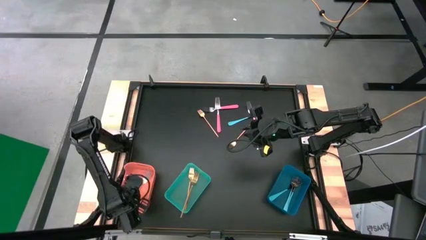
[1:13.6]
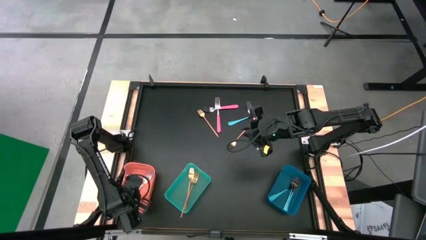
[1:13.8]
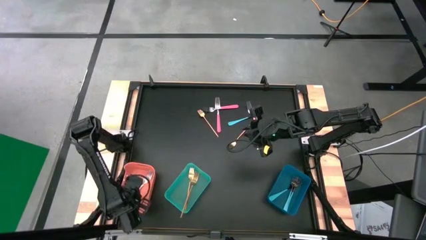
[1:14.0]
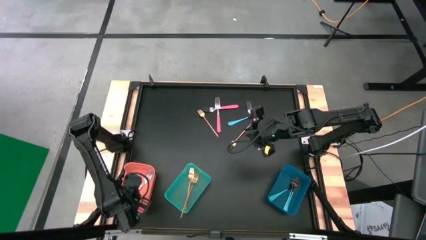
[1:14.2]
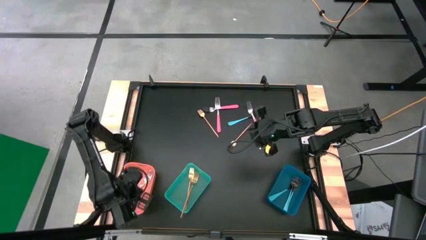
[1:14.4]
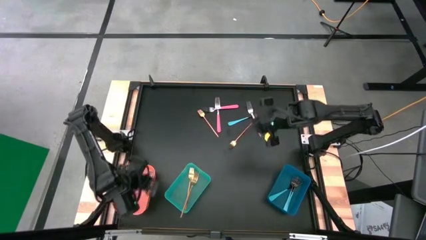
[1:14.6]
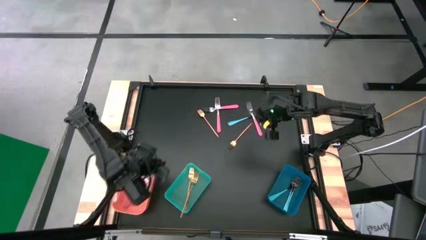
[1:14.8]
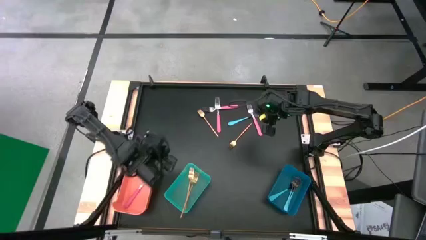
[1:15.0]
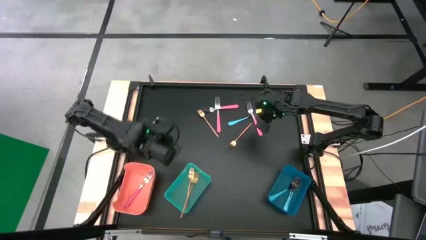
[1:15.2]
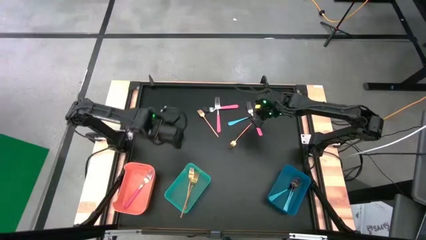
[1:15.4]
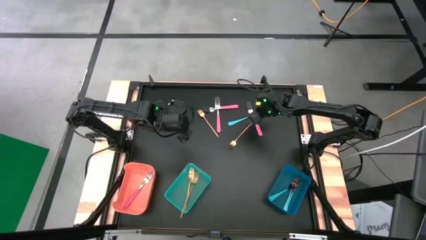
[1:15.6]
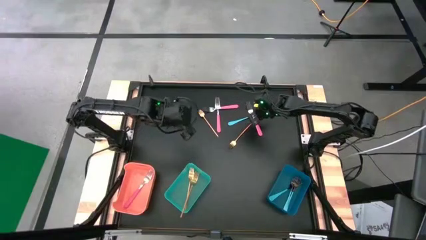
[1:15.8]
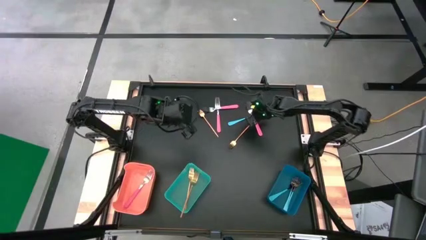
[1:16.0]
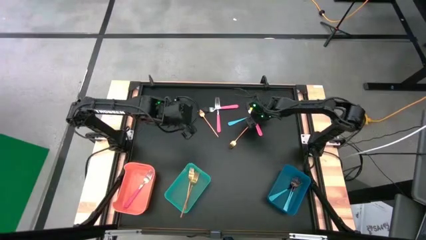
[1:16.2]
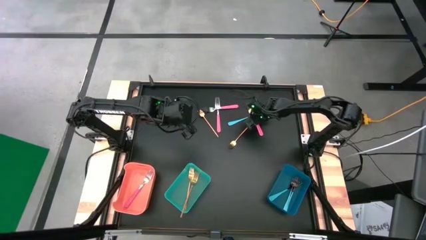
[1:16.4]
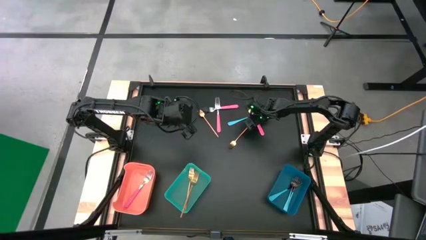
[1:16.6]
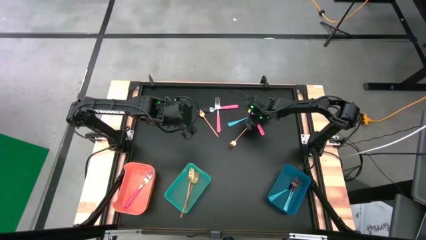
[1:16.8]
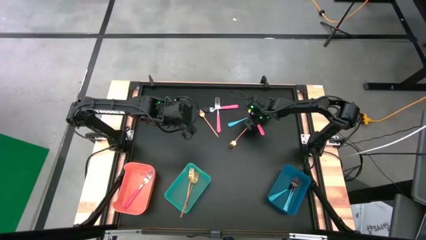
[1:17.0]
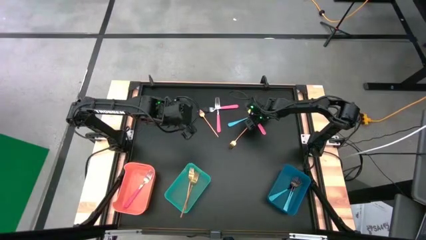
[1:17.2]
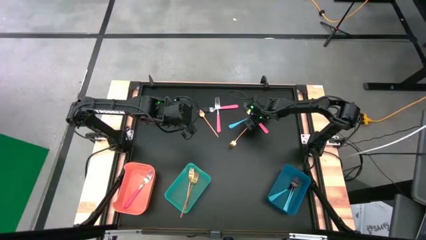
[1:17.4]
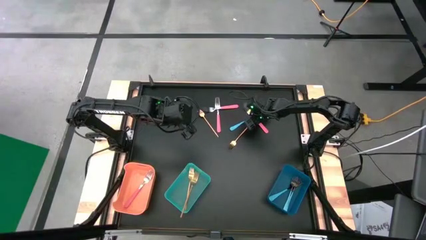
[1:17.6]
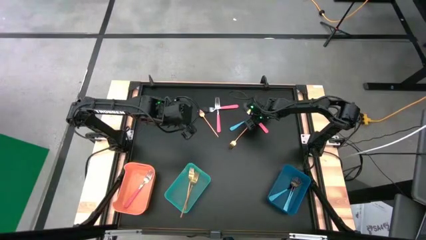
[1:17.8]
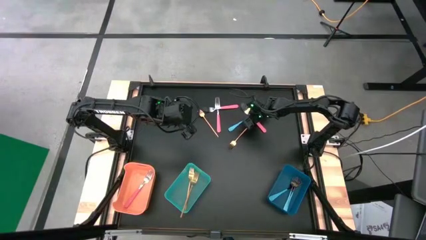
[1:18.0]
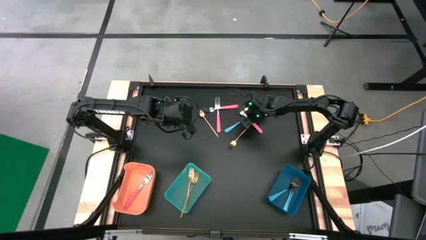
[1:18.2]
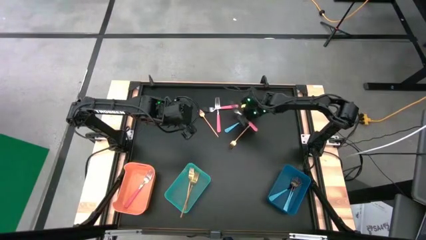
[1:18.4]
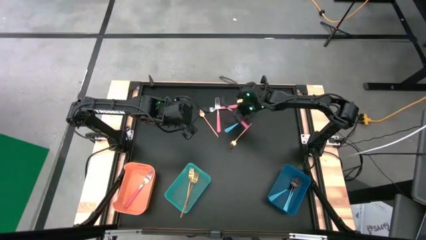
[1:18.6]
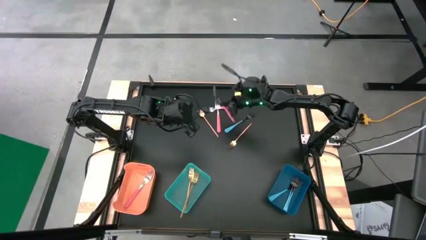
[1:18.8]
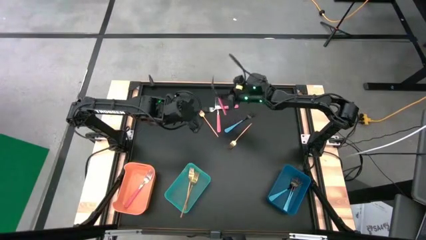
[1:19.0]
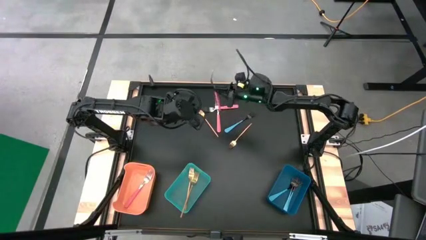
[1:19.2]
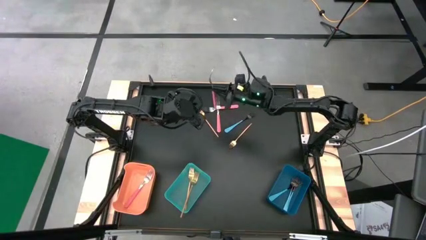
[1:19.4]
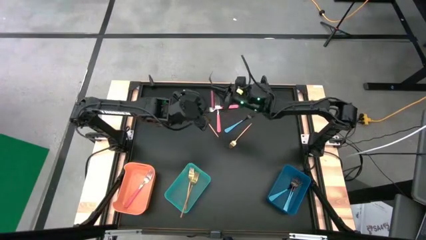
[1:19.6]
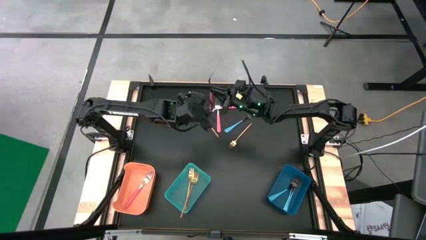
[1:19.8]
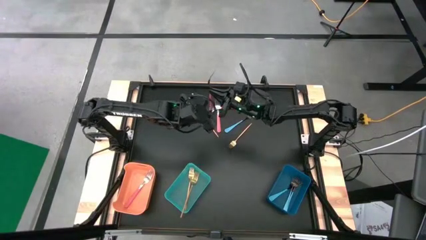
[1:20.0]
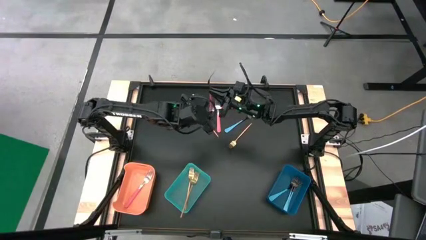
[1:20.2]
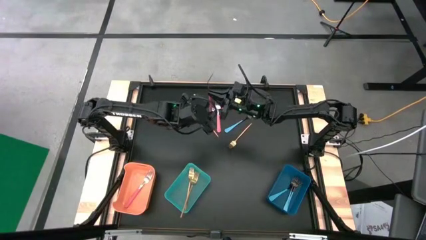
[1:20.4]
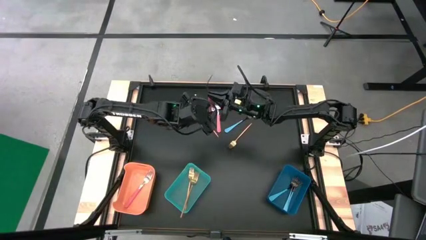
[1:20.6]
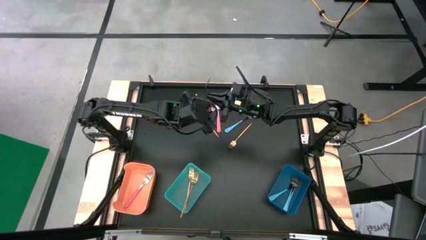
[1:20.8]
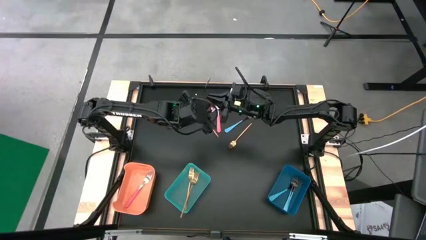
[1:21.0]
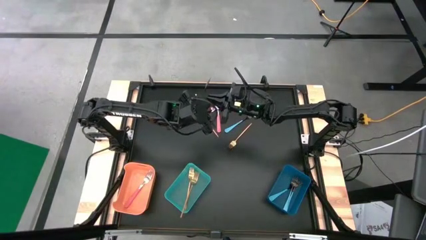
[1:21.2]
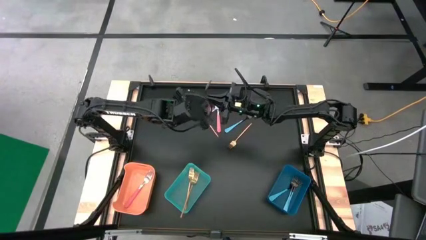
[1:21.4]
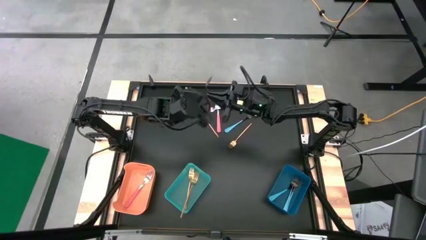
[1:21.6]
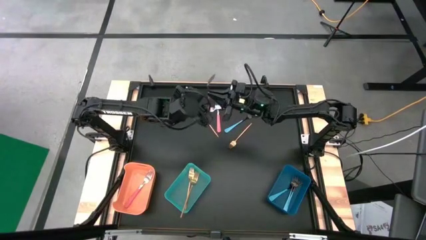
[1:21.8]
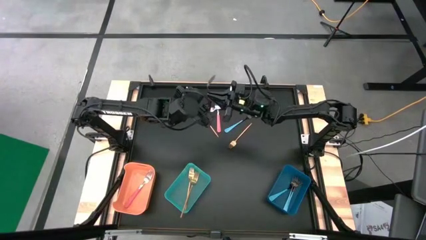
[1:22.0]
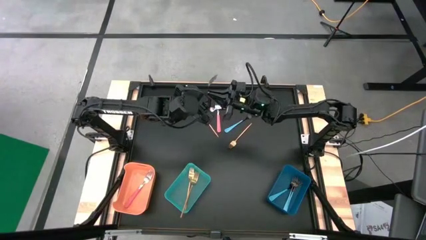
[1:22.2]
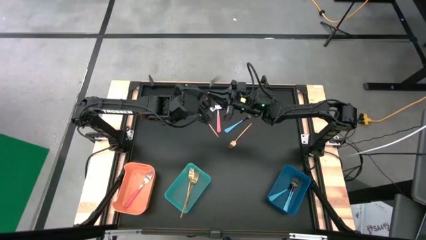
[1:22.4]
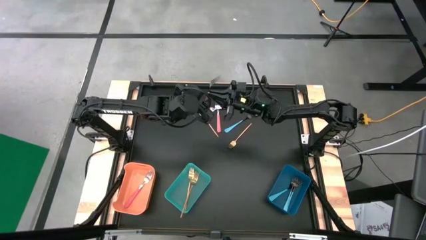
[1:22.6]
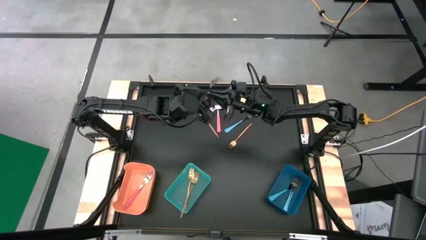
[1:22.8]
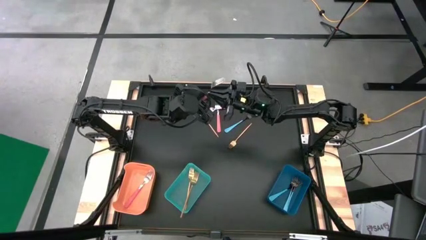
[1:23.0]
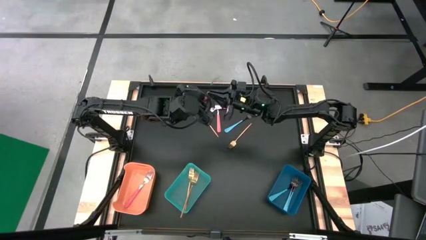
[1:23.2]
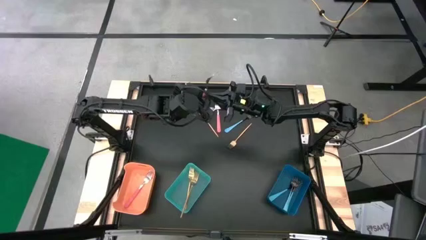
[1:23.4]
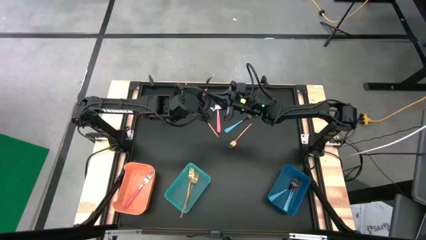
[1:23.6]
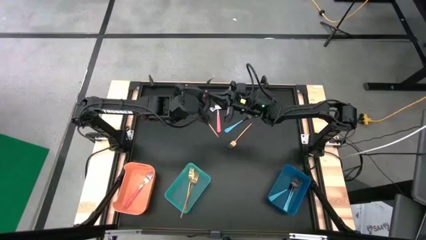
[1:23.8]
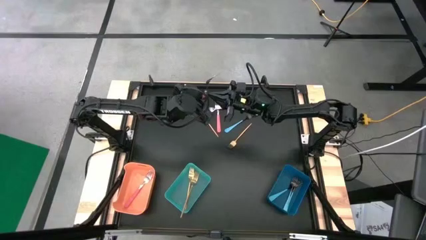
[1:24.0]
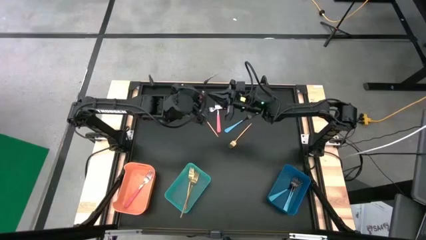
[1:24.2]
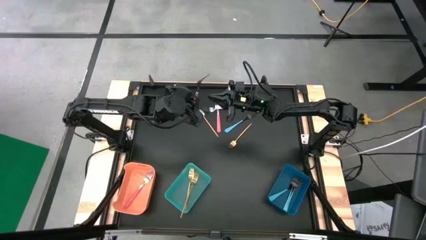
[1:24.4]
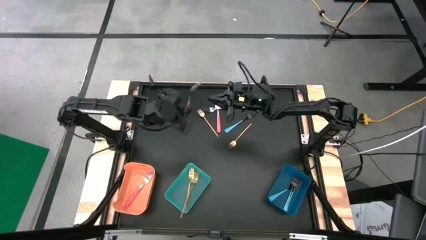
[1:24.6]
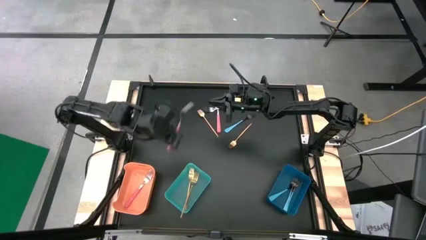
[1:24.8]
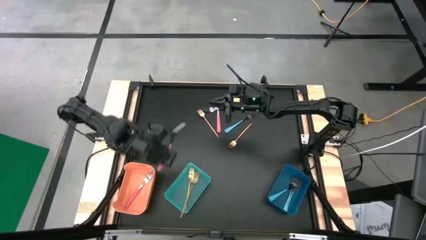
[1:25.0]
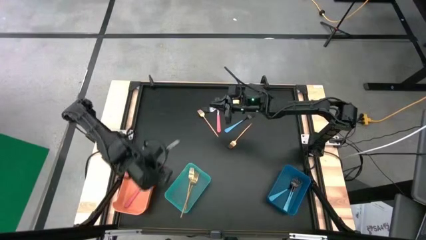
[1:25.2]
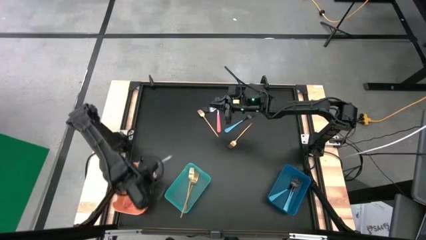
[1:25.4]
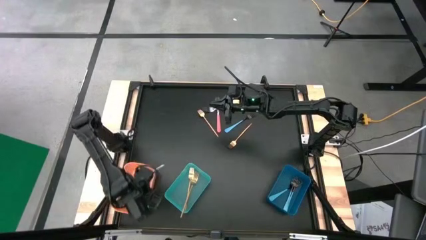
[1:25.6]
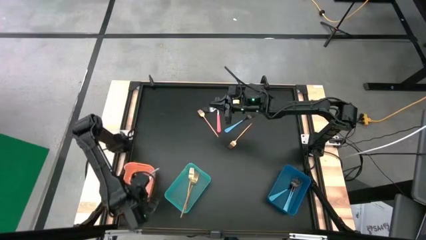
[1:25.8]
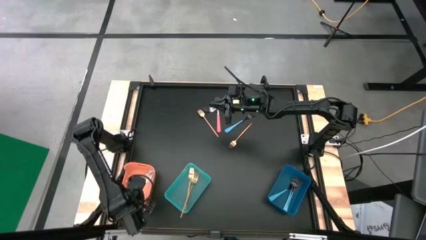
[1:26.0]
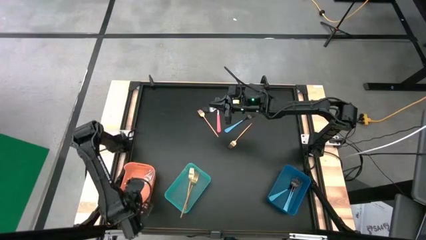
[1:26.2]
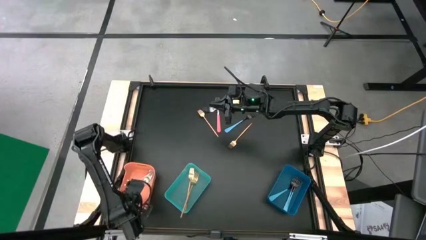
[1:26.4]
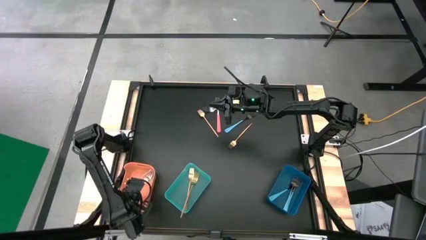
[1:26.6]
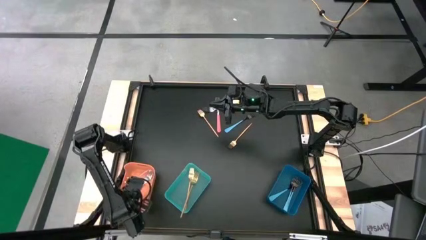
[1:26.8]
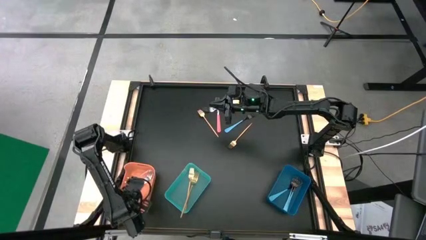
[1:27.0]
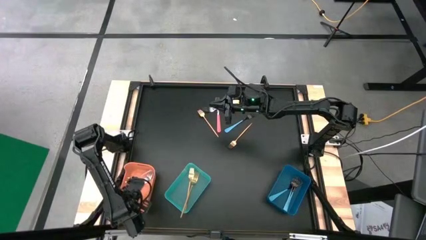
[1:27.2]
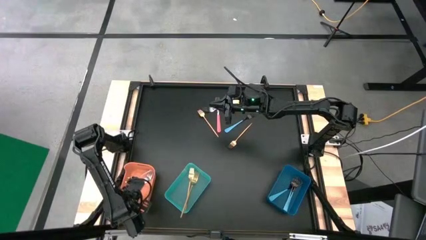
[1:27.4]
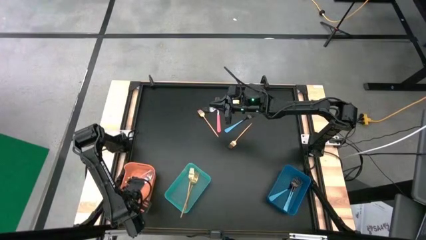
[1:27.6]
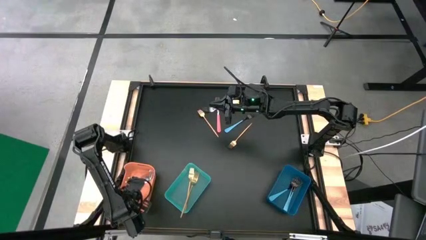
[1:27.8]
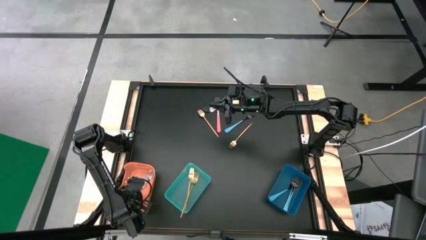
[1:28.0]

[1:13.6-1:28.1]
Task: Sort silverware by color (type)
Put the pink fork into the orange bin

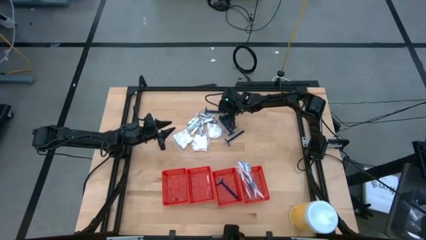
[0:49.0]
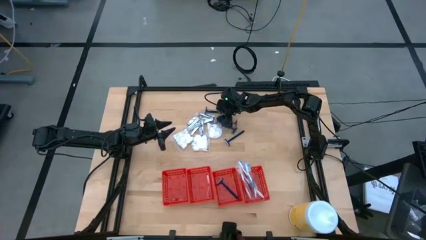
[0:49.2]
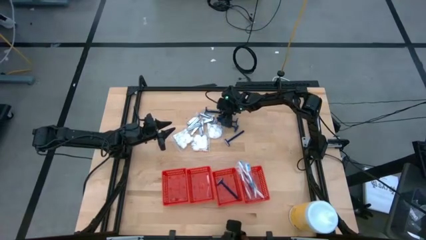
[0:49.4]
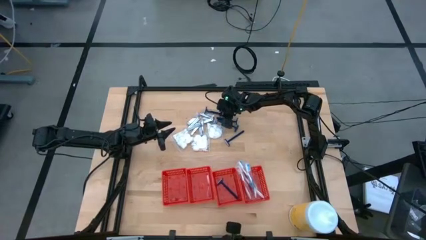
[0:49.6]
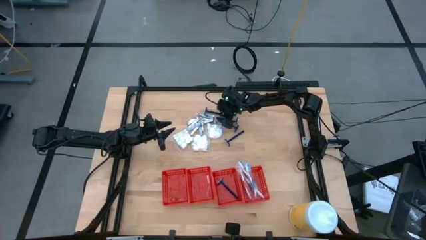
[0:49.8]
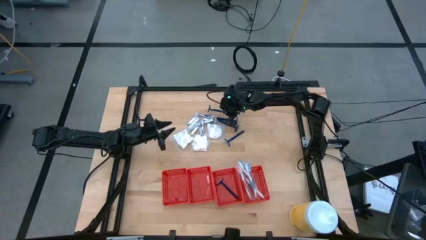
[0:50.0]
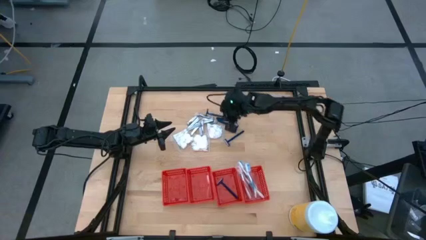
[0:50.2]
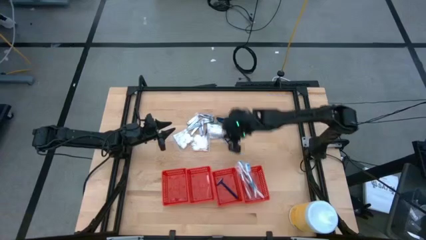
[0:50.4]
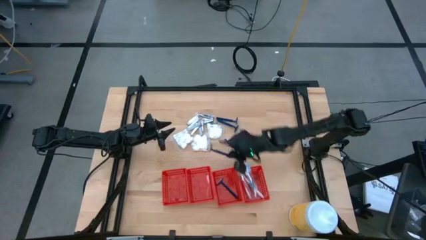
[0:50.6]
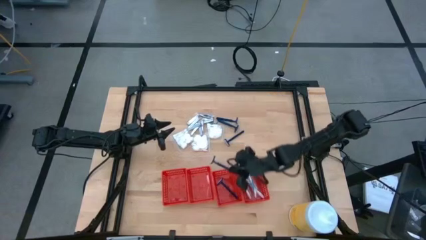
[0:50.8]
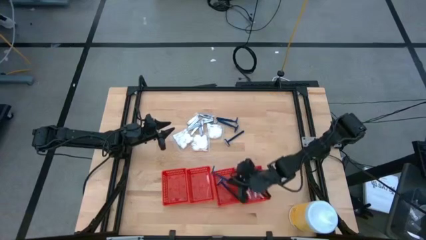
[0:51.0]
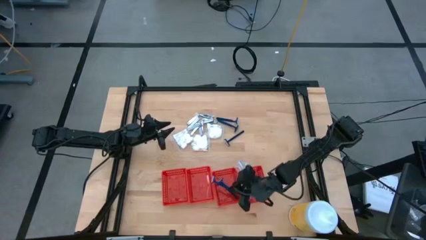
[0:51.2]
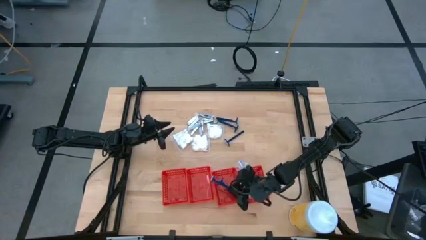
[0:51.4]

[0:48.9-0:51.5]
Task: Pick & Place Travel size toiletries
Put the blue razor into the middle right red bin
